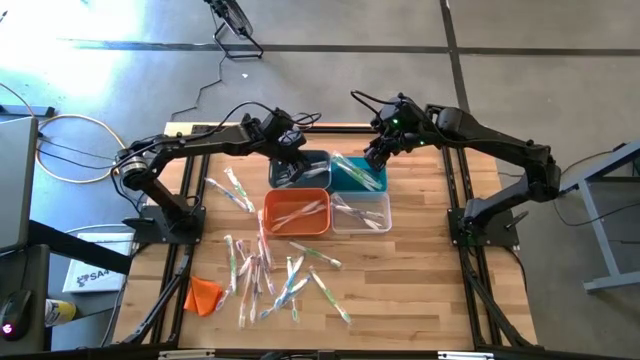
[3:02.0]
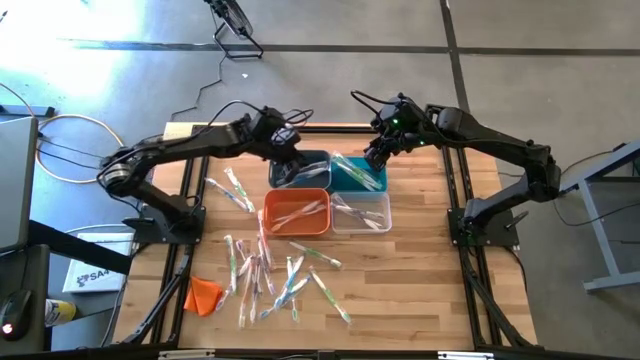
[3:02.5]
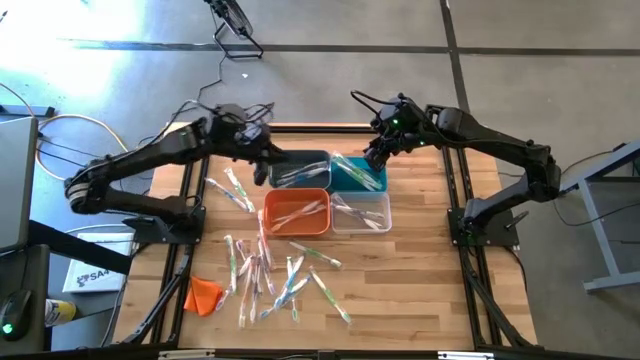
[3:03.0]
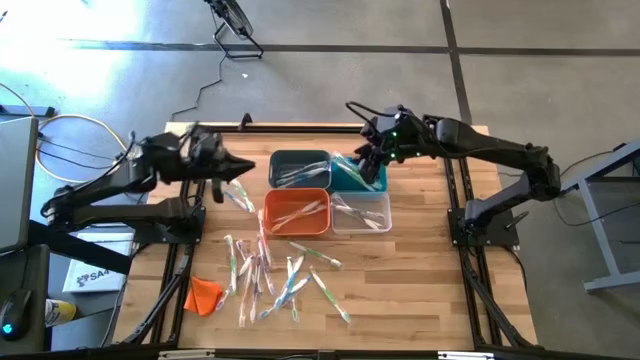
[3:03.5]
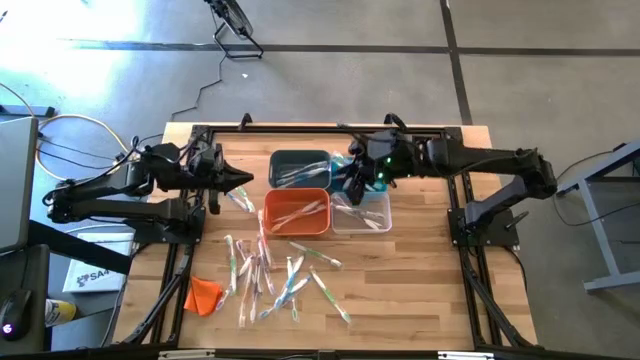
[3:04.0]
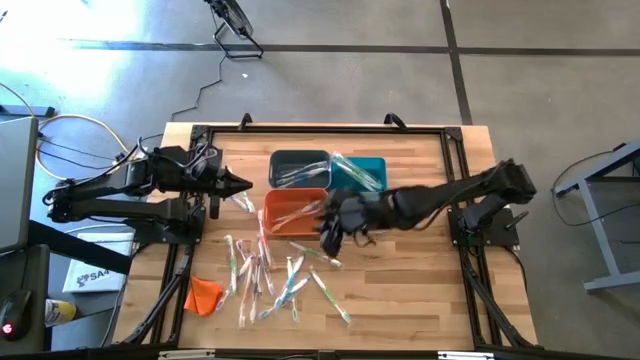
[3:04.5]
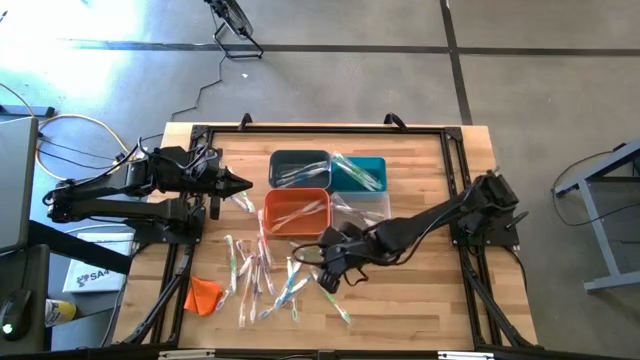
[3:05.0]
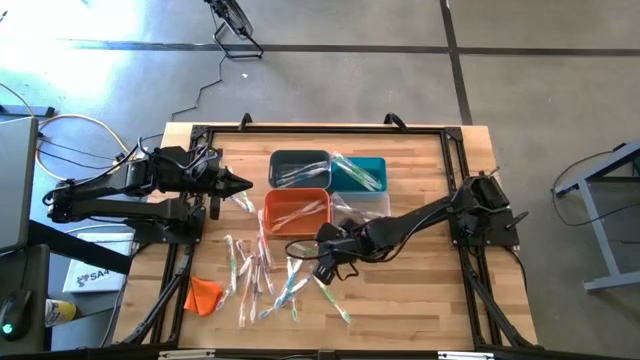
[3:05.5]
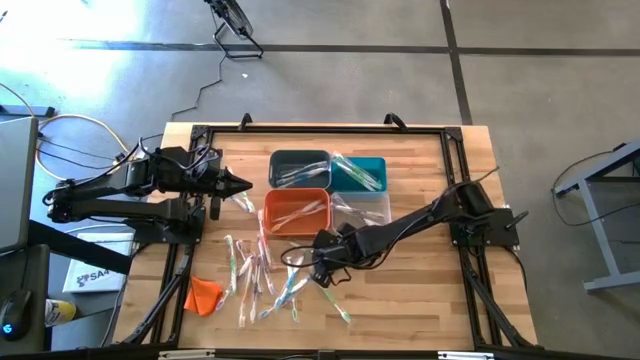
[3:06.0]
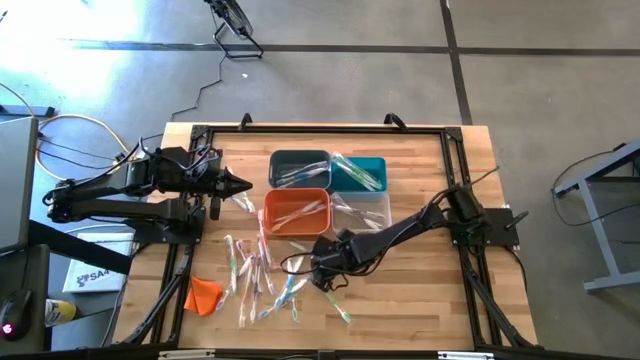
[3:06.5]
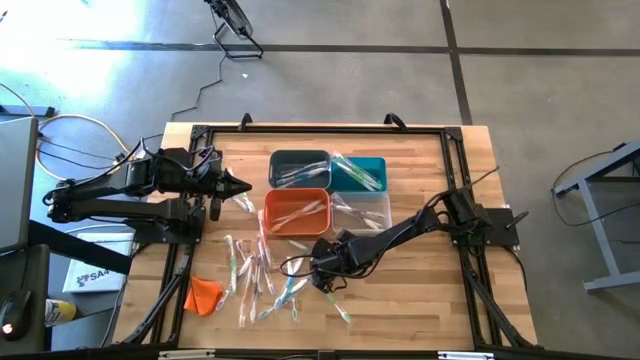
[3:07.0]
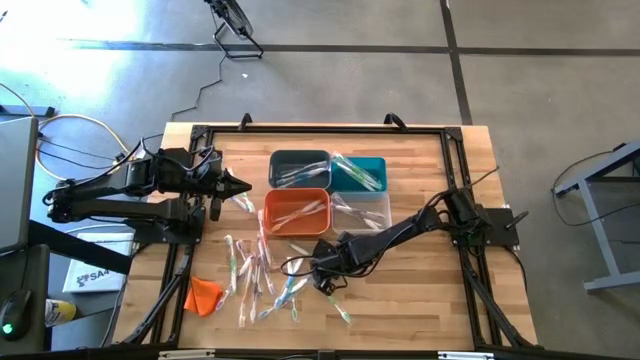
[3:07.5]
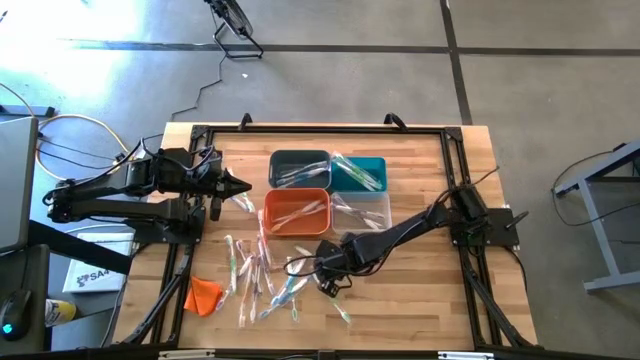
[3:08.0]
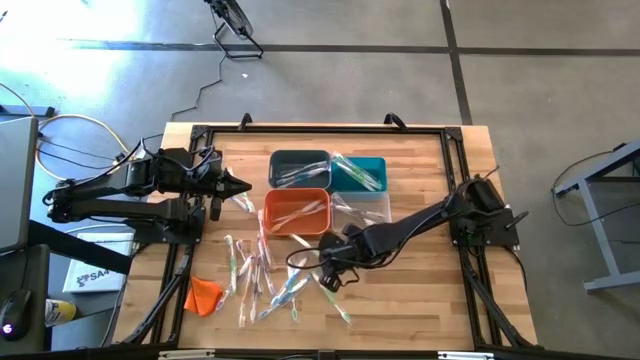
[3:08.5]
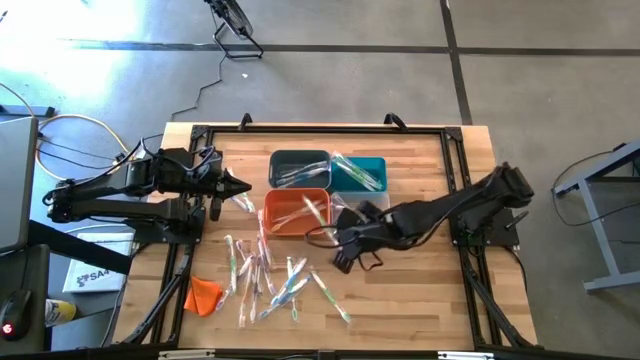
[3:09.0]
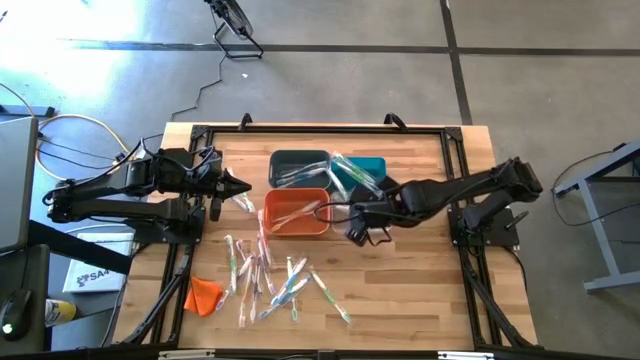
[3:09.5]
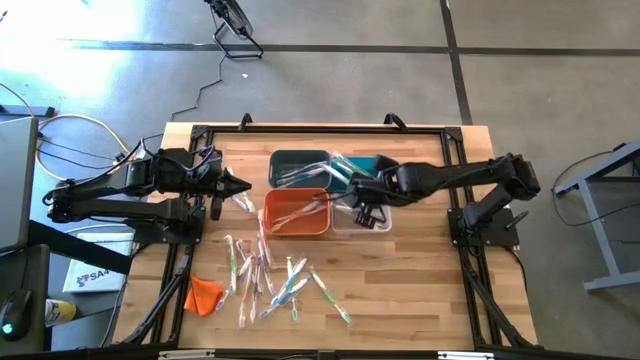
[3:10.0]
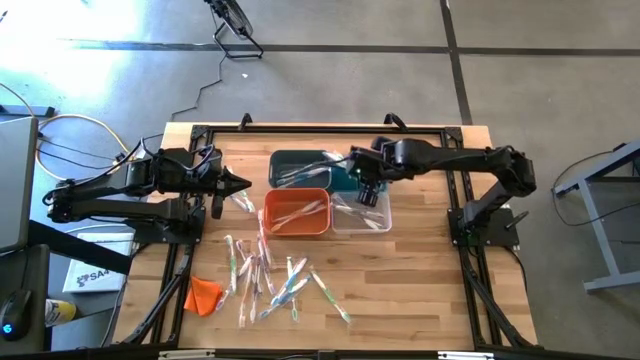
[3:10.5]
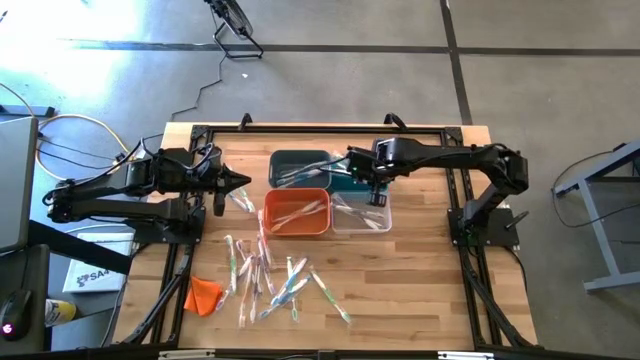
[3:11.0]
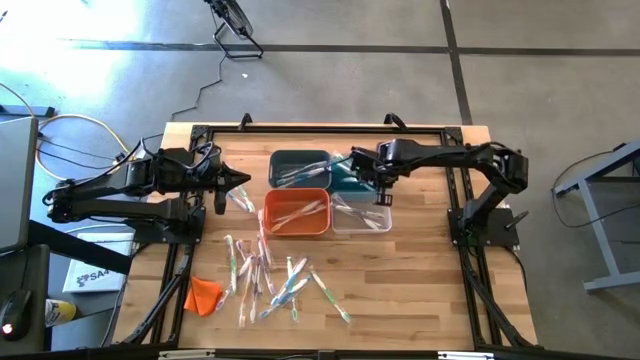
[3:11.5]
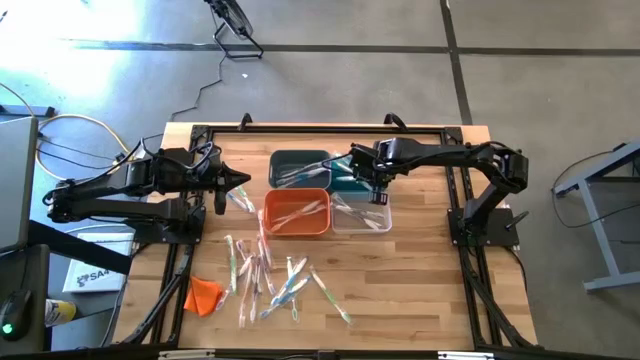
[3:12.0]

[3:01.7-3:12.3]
Task: Pick & Place Toothbrushes
Put the green toothbrush into the right blue bin

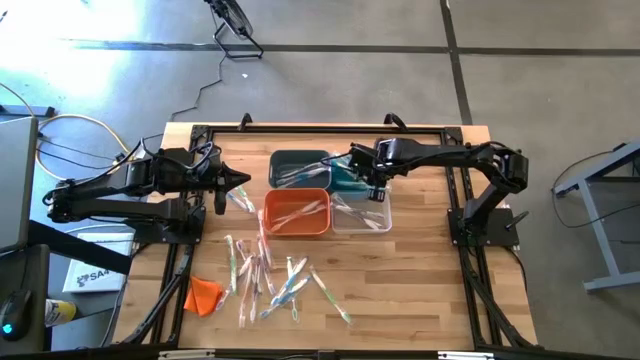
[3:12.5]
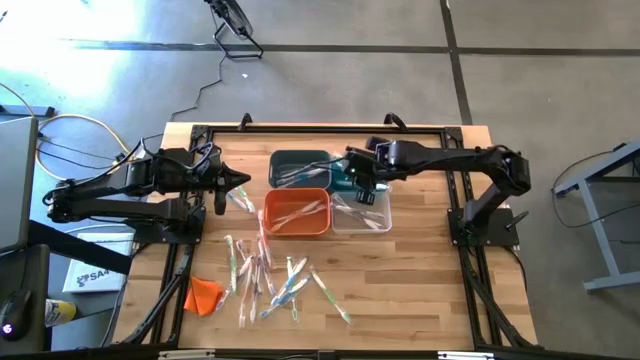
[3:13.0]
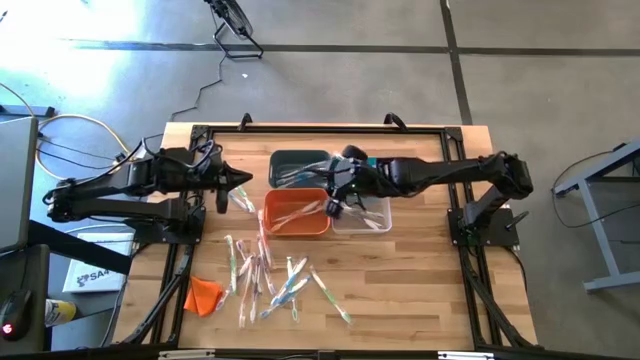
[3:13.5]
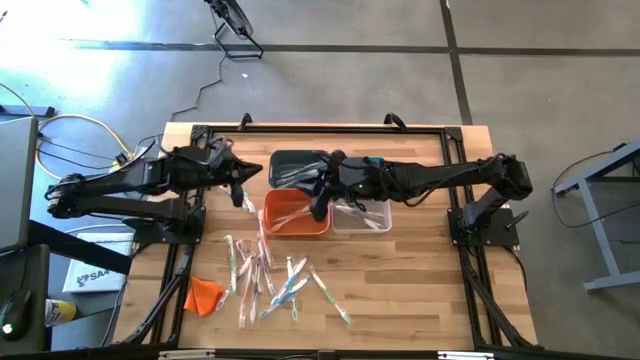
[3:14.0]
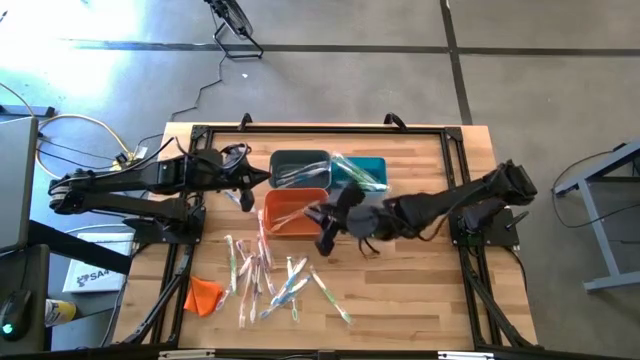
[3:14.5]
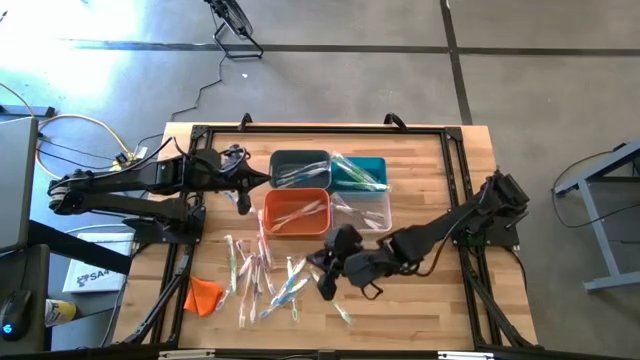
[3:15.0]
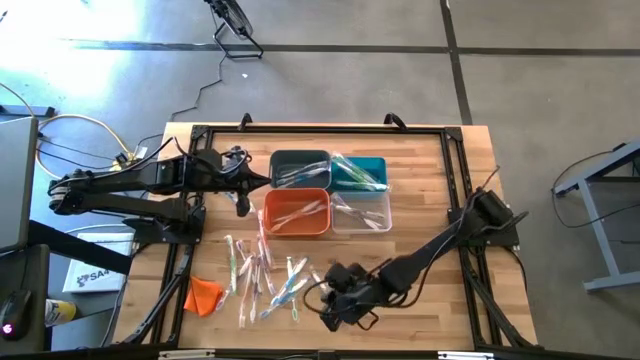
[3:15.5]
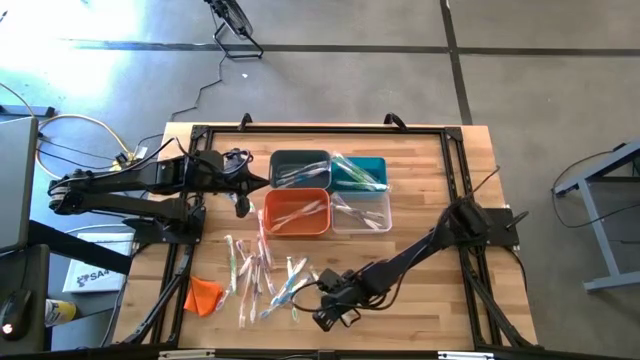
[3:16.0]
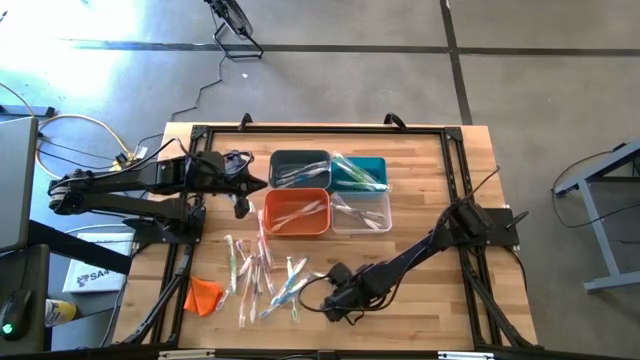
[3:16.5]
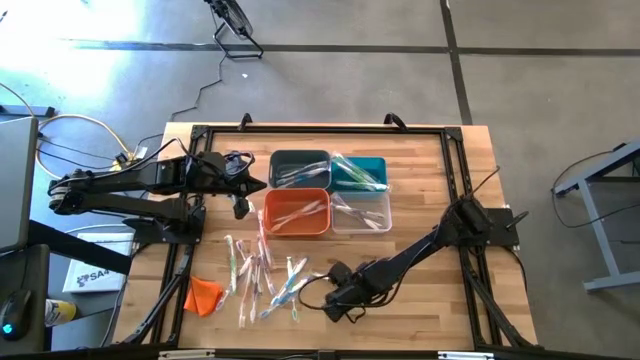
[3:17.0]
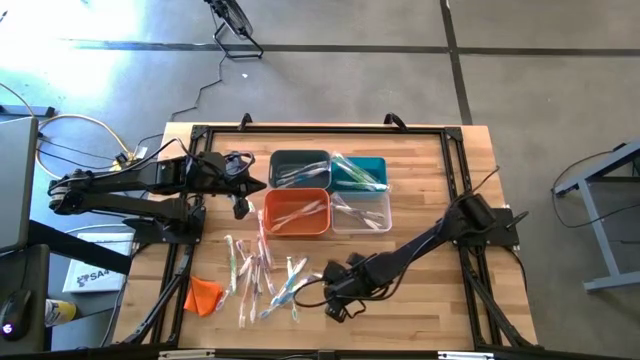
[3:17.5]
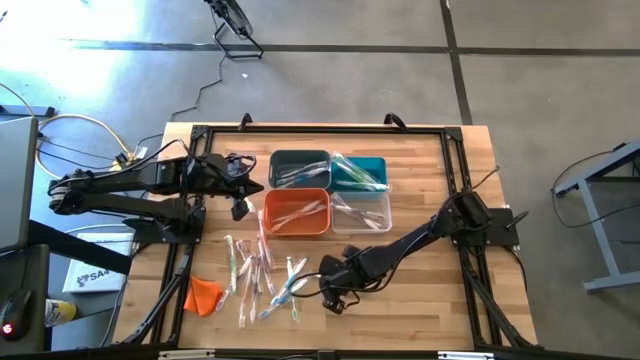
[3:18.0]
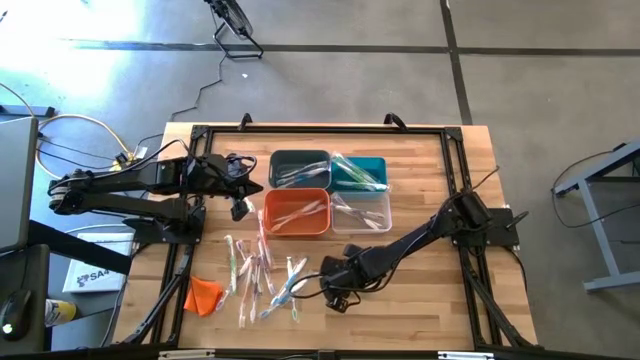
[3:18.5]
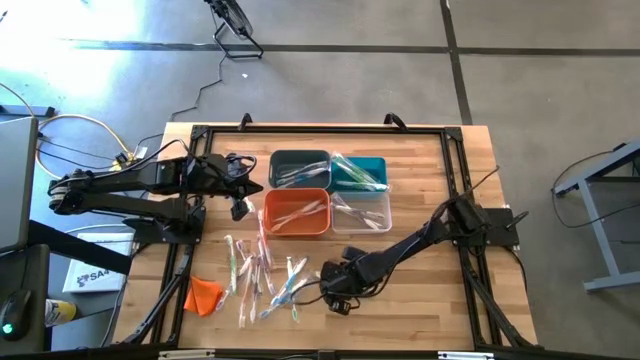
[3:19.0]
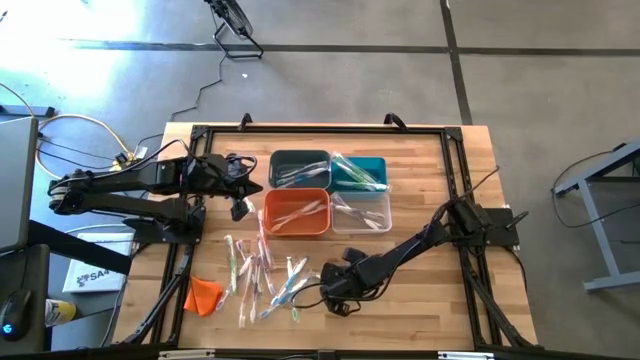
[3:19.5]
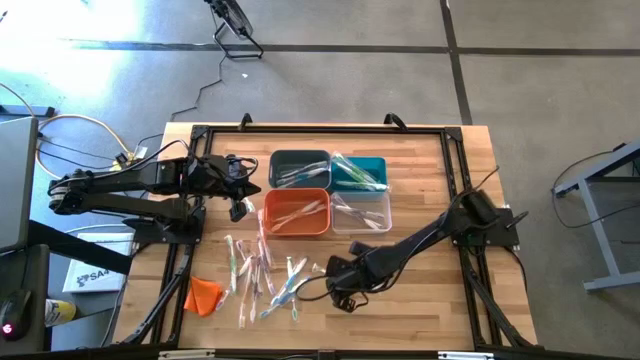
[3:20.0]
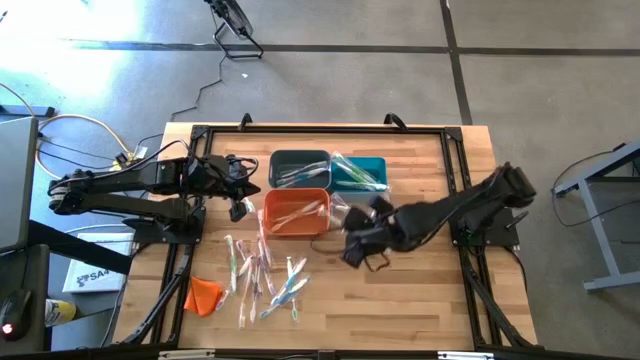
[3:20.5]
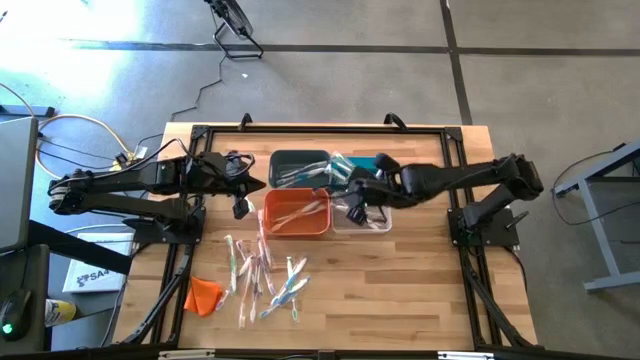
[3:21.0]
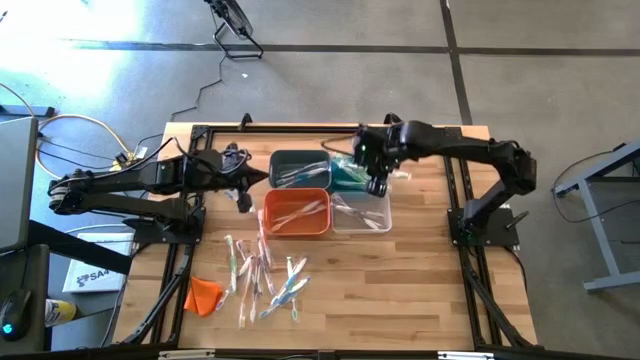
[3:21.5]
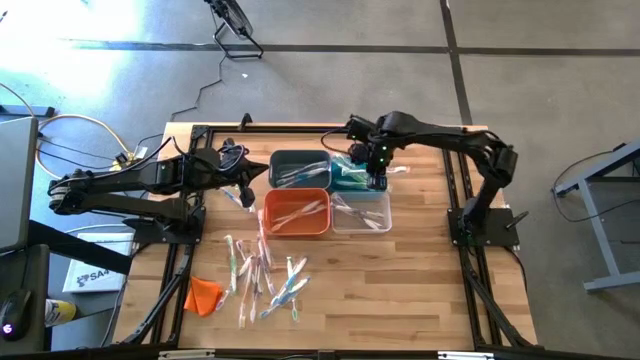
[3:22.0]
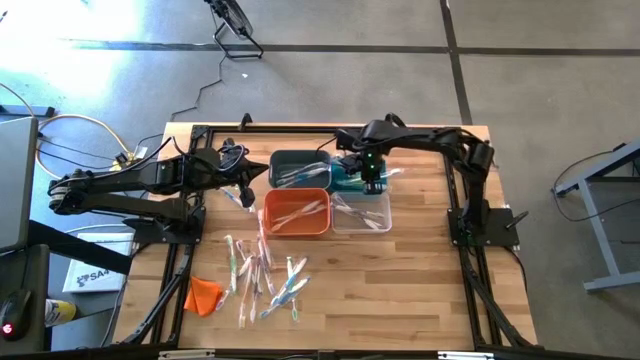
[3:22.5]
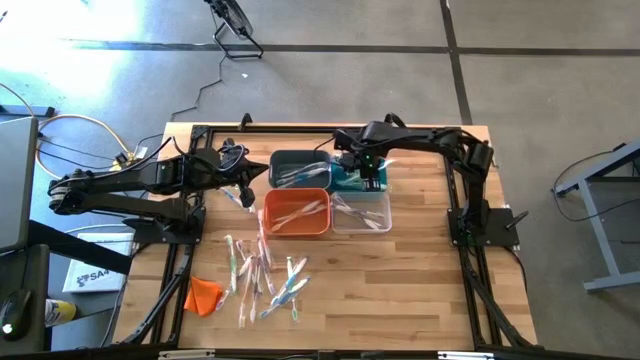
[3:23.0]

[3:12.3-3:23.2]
Put the green toothbrush into the right blue bin
